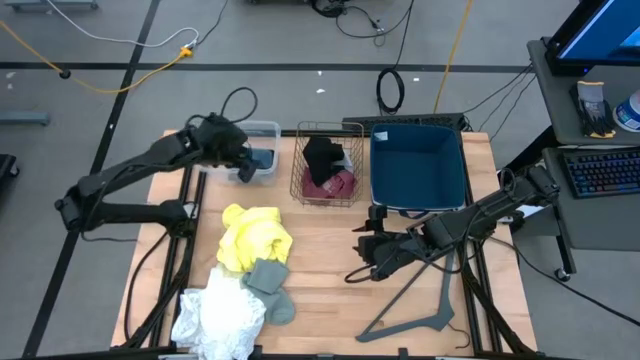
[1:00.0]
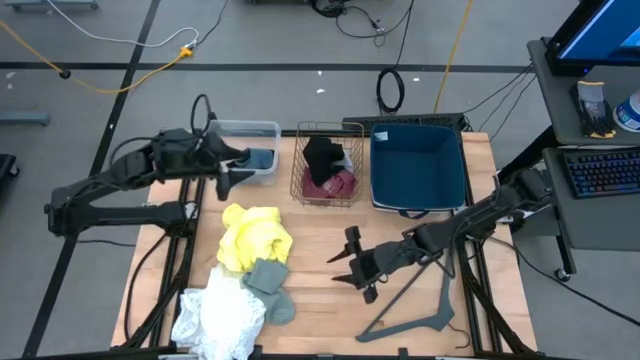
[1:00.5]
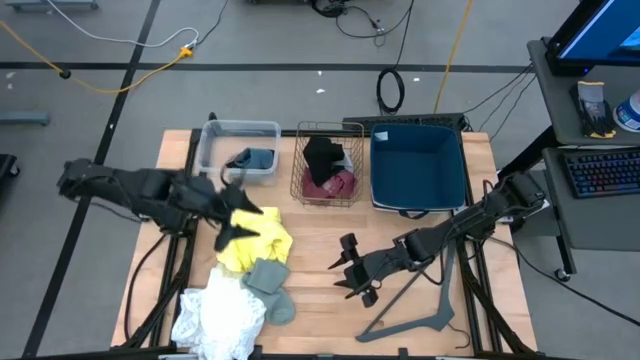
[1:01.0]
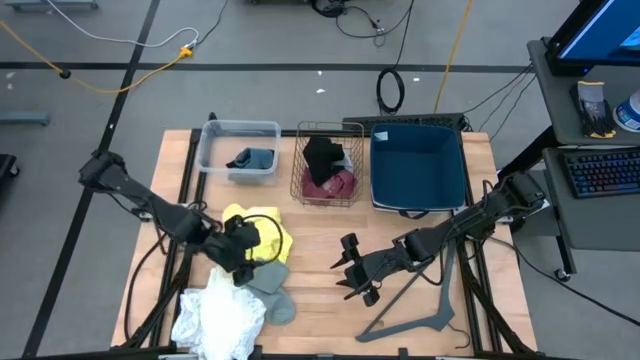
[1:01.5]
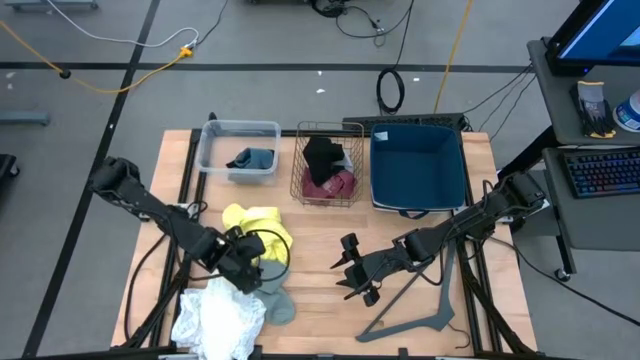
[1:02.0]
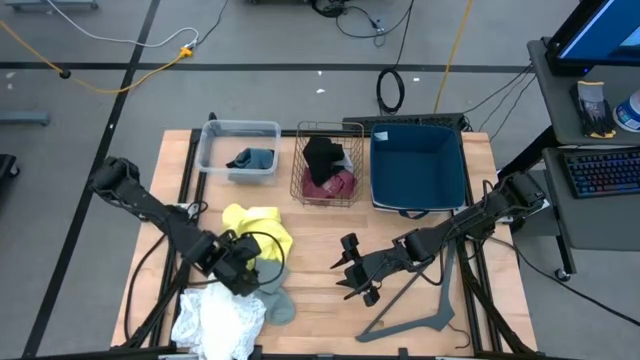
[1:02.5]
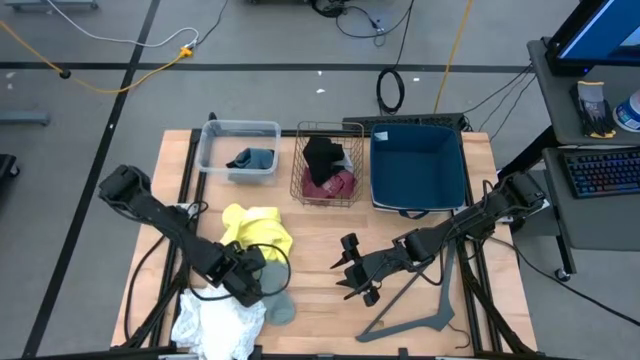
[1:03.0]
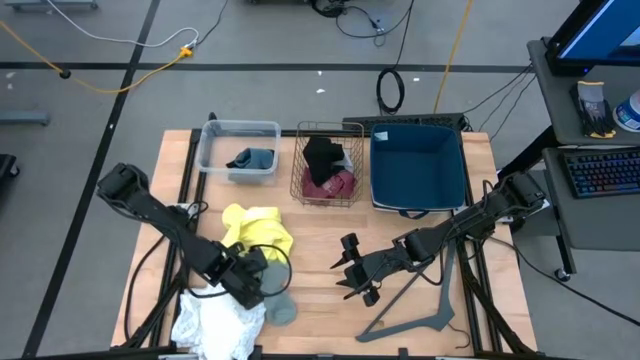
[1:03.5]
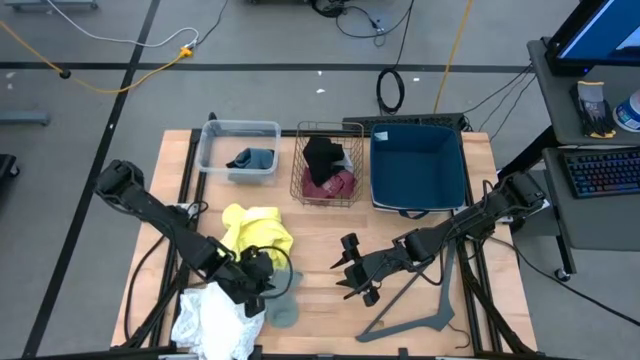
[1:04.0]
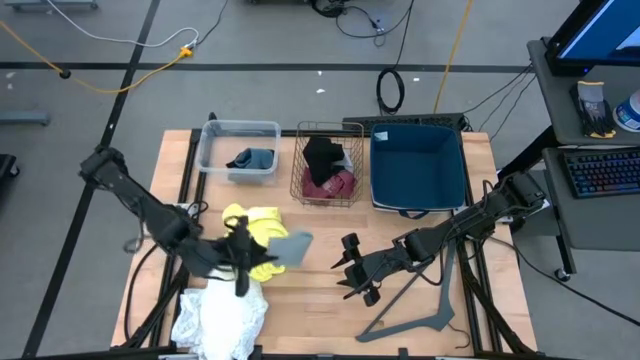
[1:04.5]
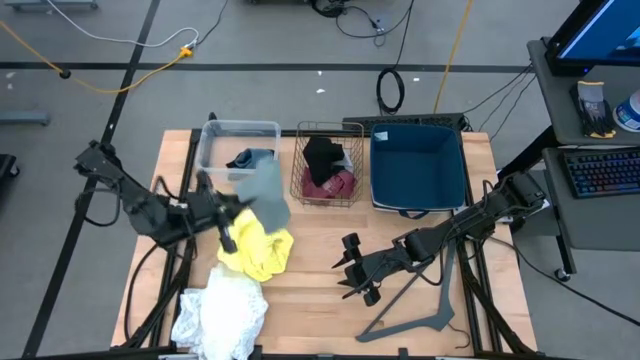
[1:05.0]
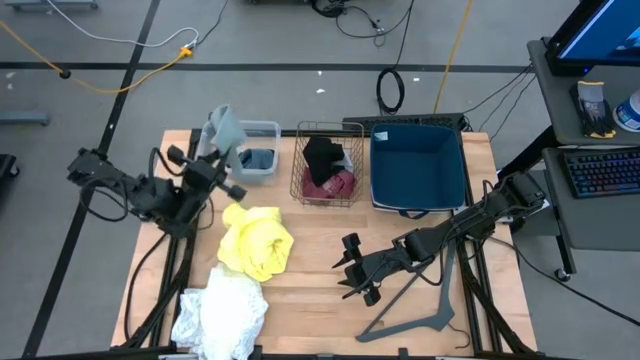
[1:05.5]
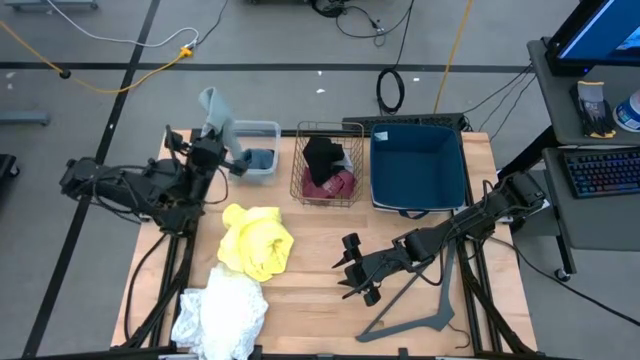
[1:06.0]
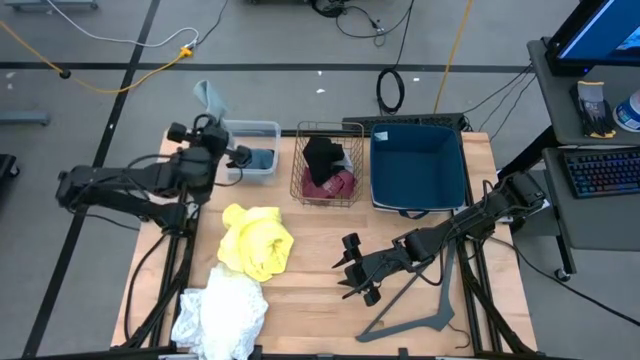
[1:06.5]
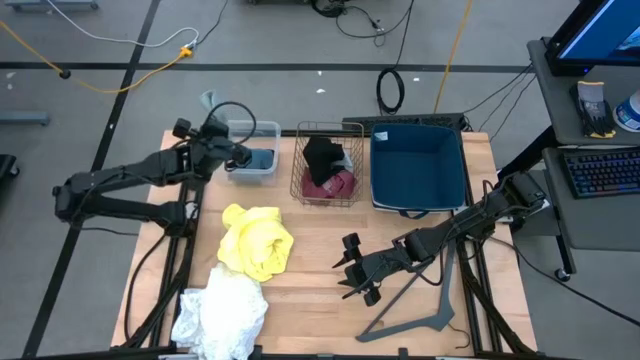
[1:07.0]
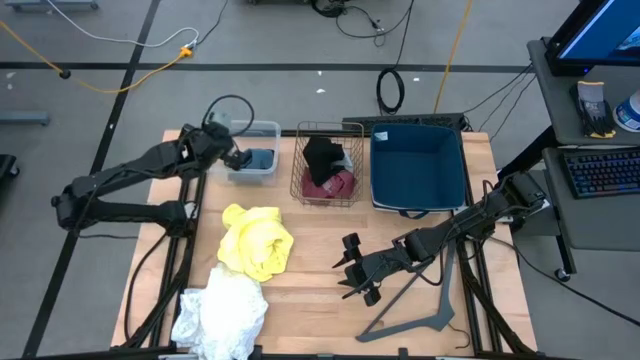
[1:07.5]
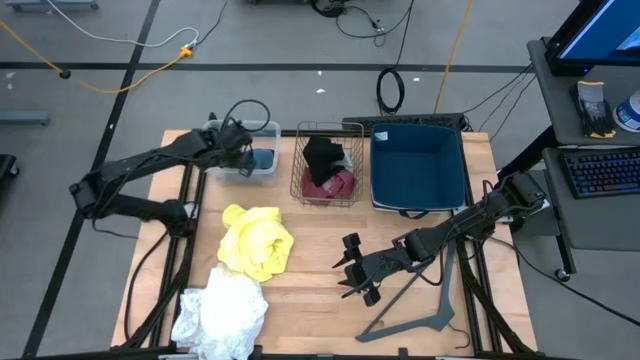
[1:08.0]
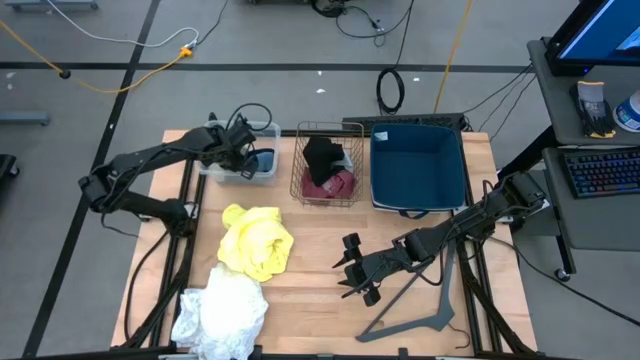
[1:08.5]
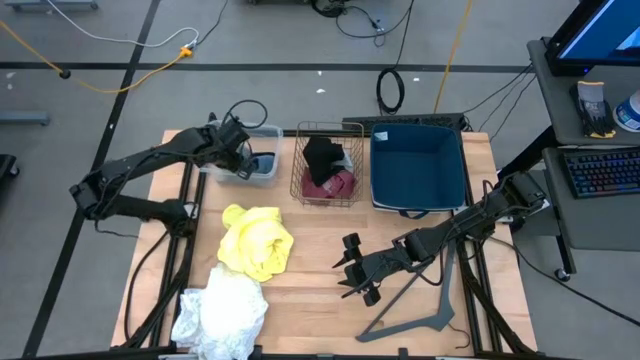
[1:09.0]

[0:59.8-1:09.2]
Task: Pick & Place Cloths
Put the gray sock into the transparent bin

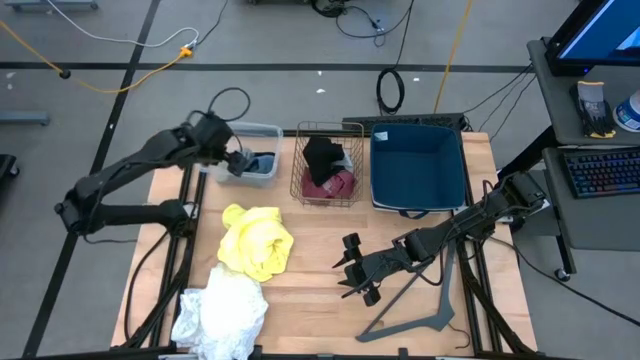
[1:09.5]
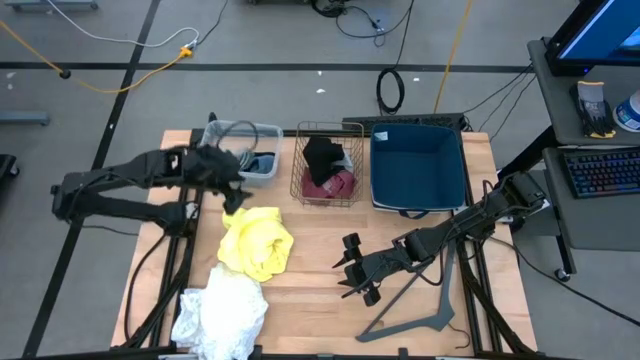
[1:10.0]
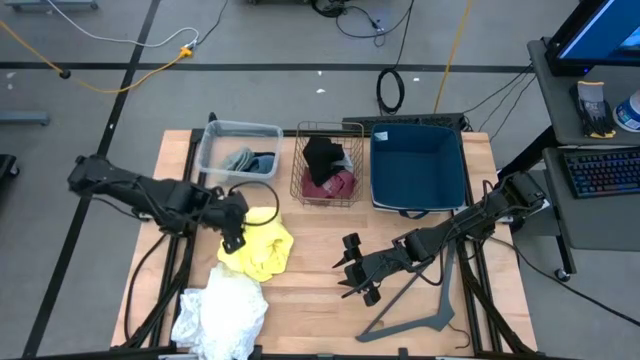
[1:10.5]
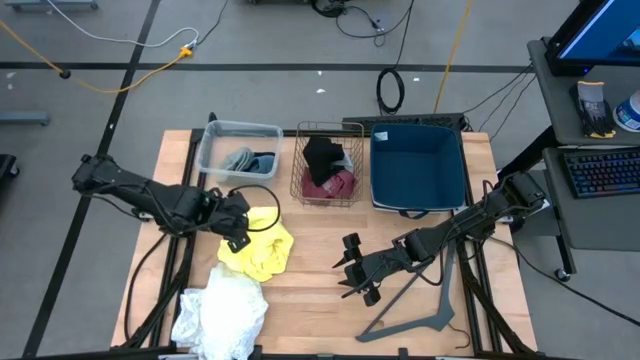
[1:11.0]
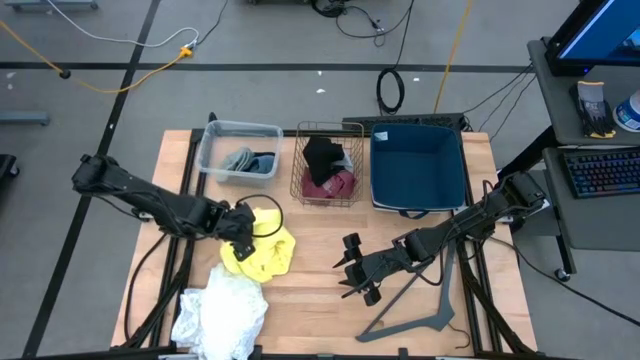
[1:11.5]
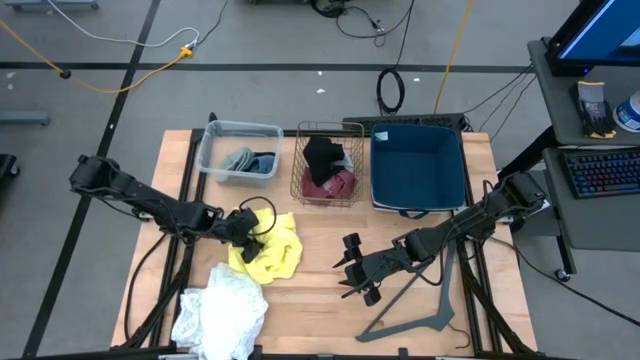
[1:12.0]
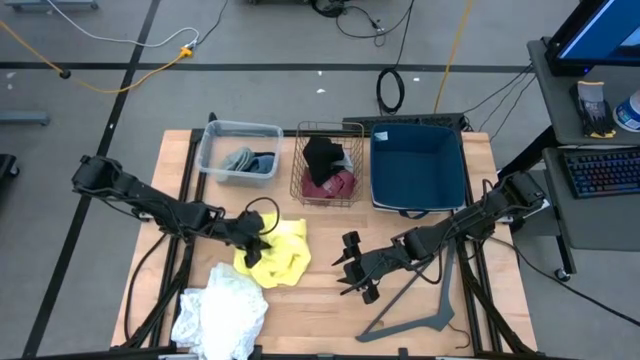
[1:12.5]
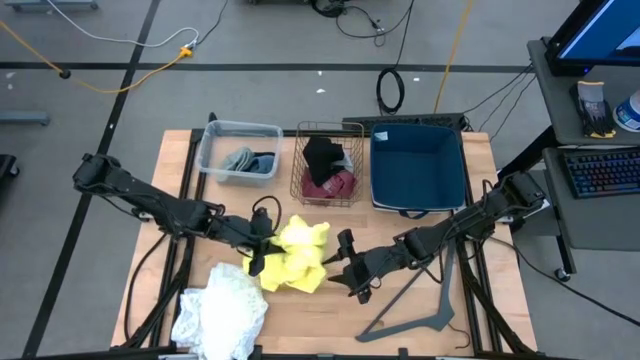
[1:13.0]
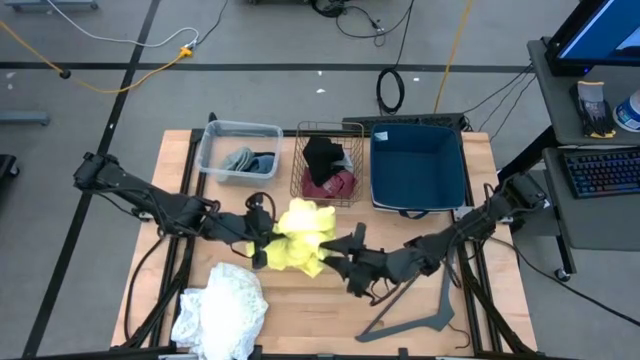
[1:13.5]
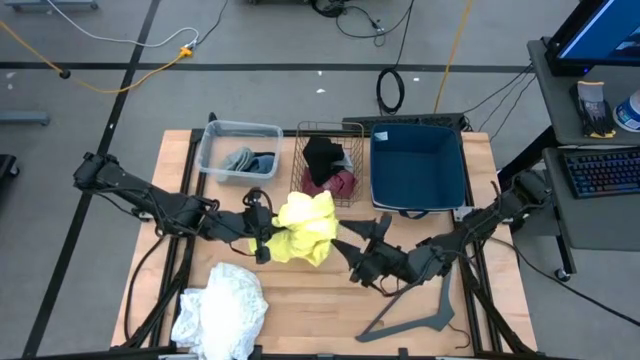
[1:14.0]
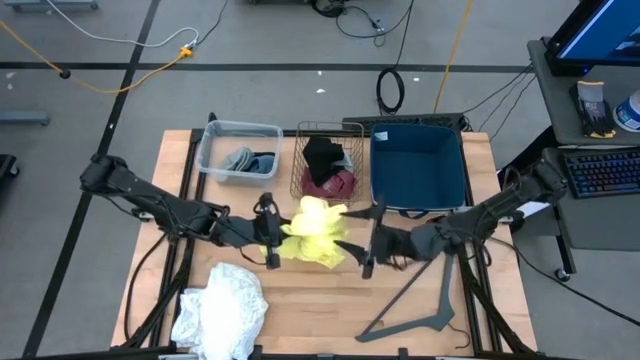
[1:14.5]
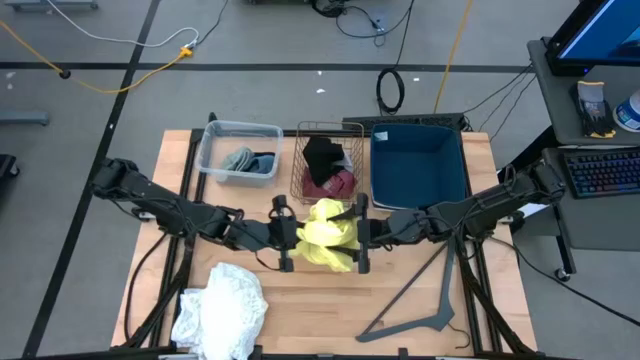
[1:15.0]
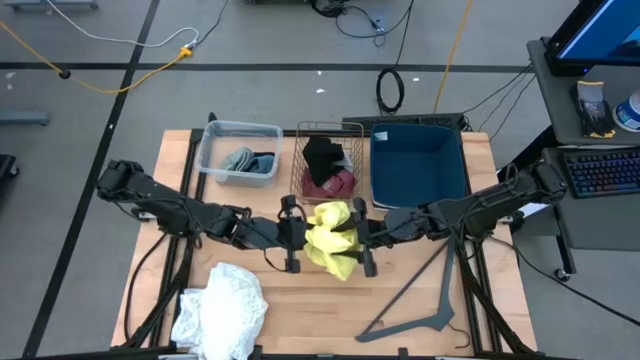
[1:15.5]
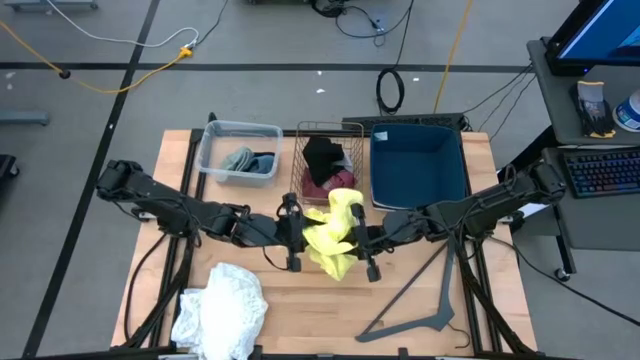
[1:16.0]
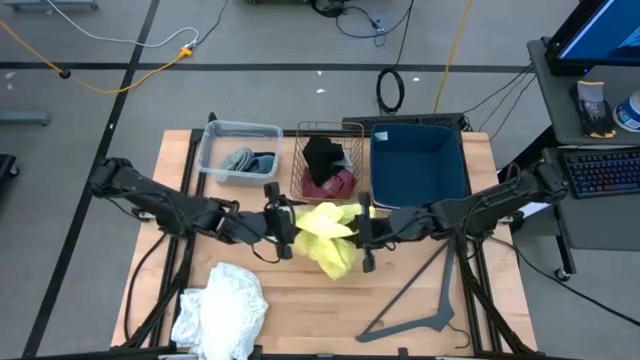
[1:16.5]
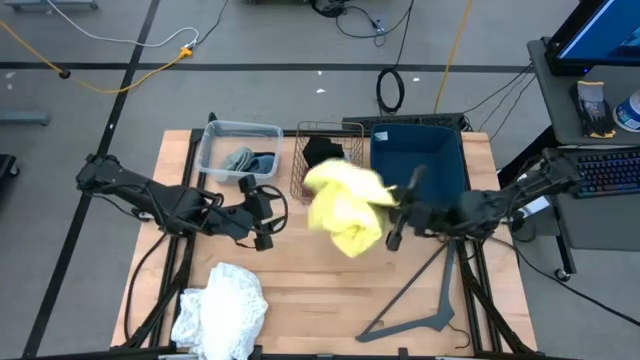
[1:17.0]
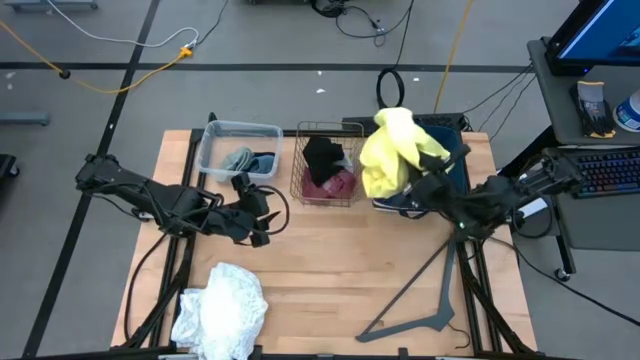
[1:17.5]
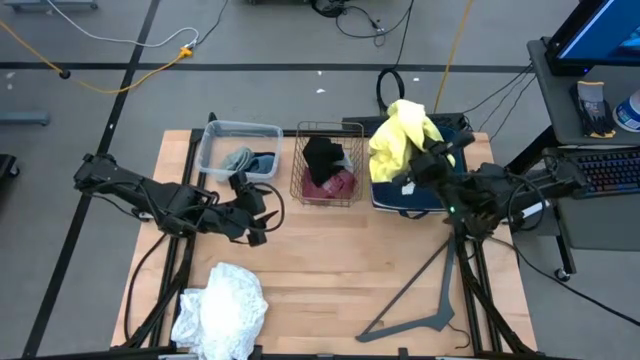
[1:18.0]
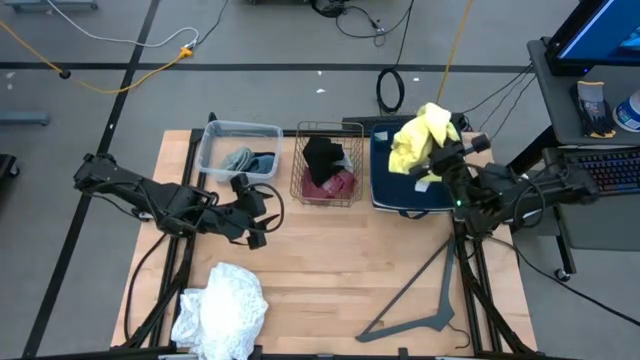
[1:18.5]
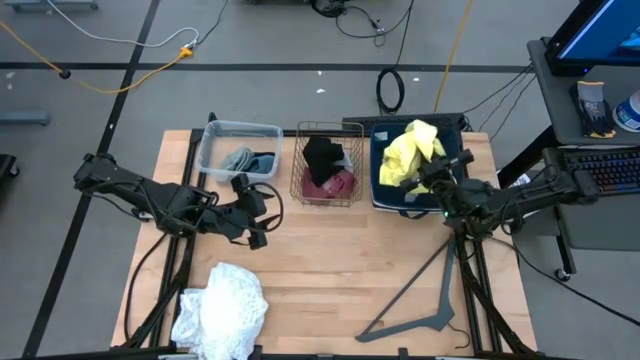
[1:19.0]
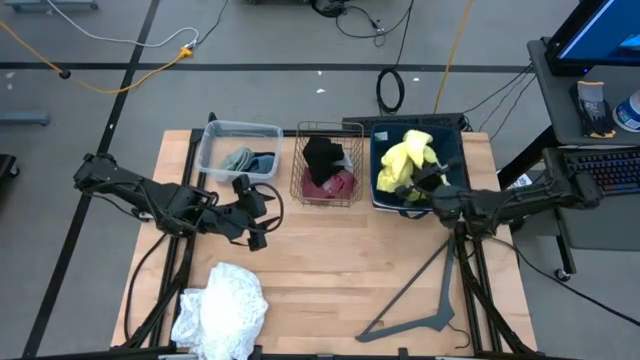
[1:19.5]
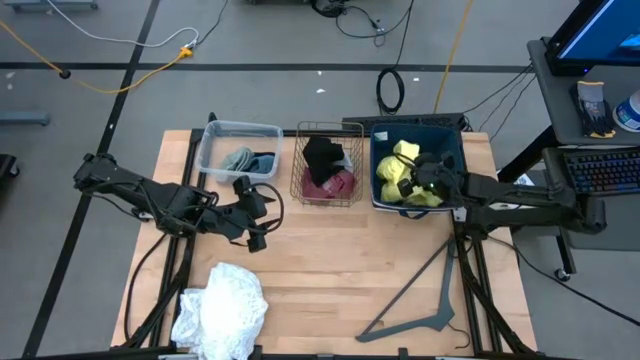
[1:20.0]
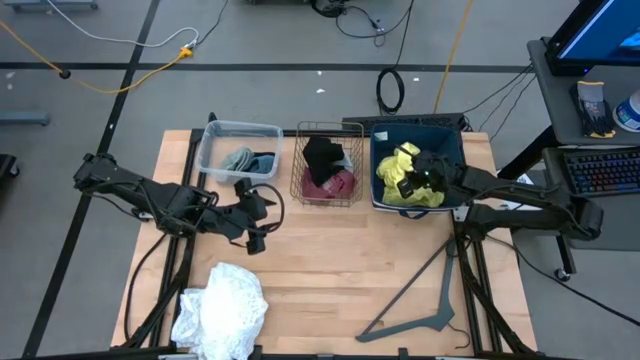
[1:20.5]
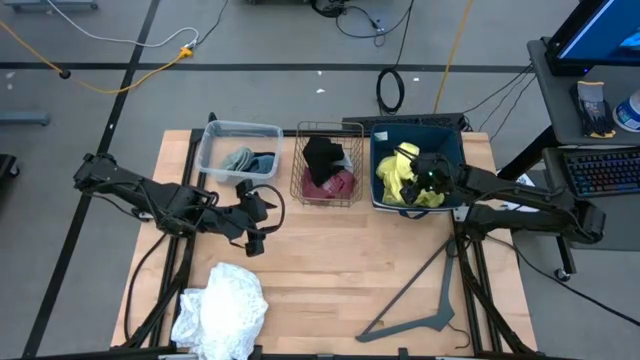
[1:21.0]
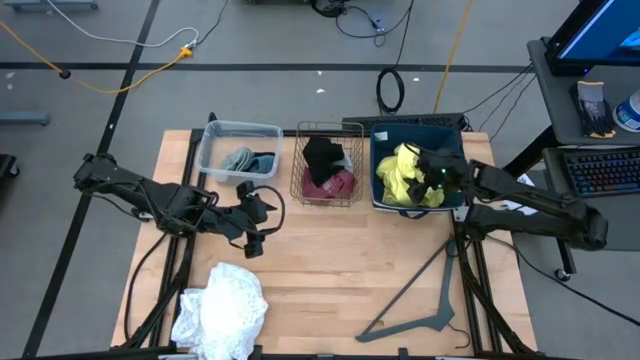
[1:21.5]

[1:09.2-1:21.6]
Put the yellow shirt into the laundry bin

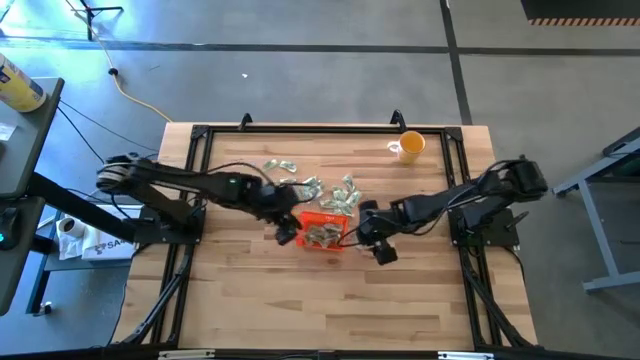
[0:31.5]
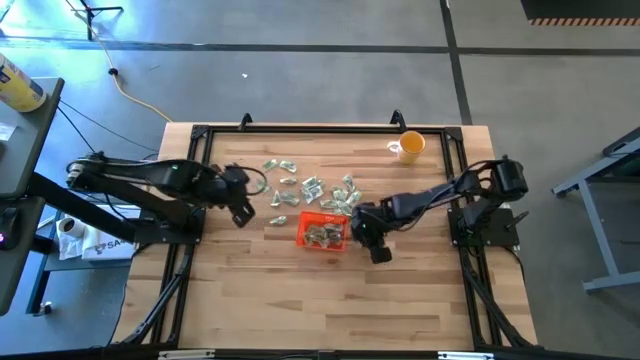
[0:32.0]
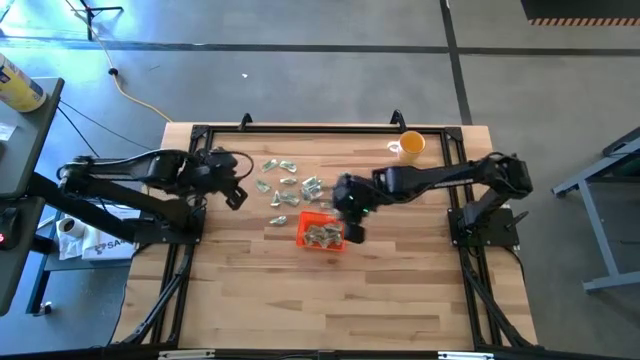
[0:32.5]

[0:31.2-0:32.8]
Task: Pick and place Stevia / Truvia into bins
Put the stevia packet into the orange bin
